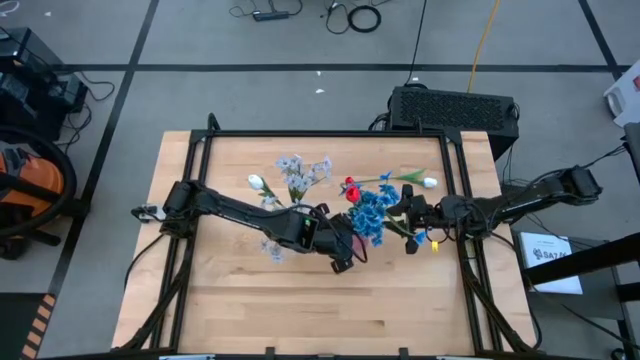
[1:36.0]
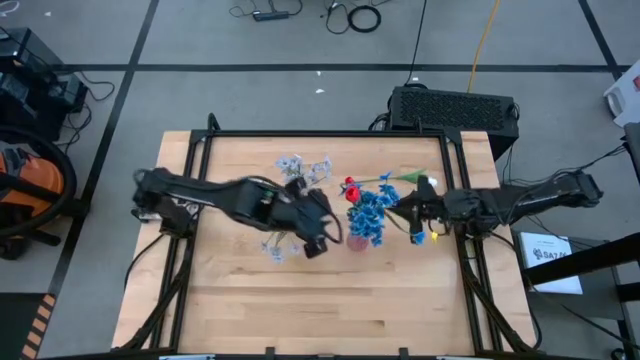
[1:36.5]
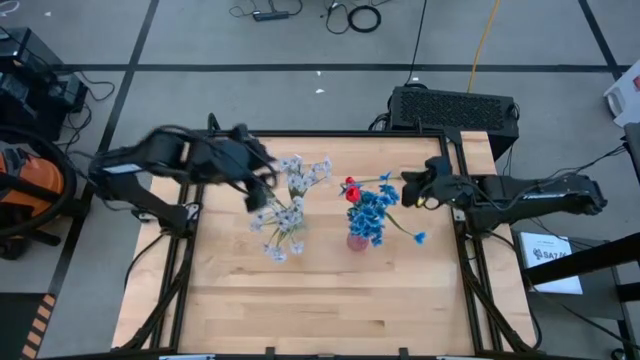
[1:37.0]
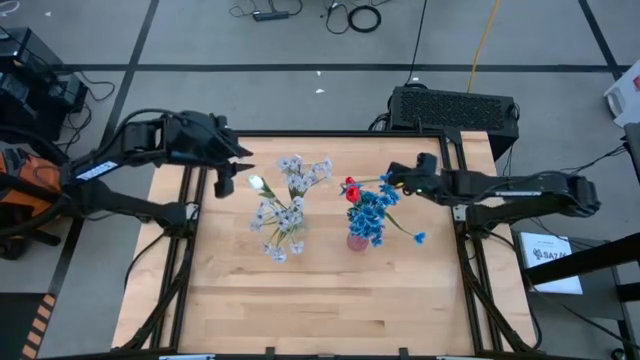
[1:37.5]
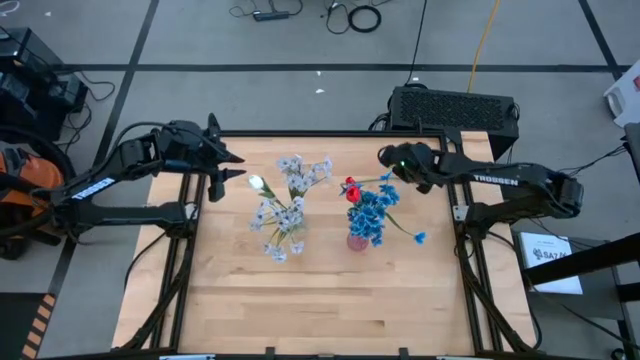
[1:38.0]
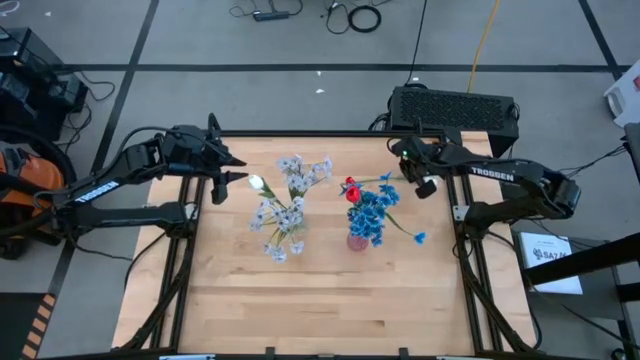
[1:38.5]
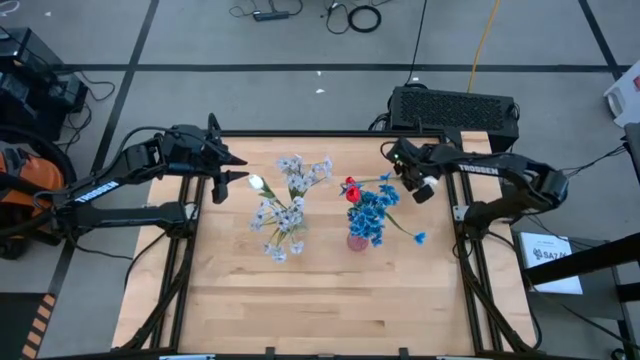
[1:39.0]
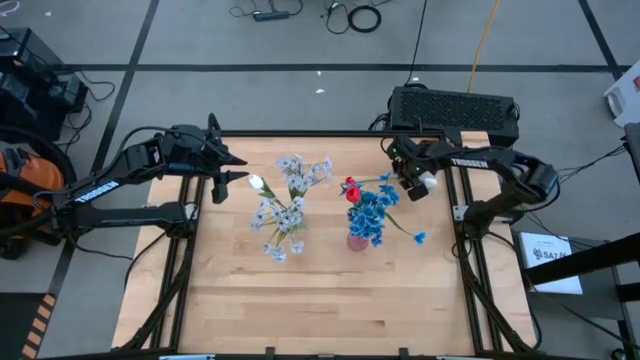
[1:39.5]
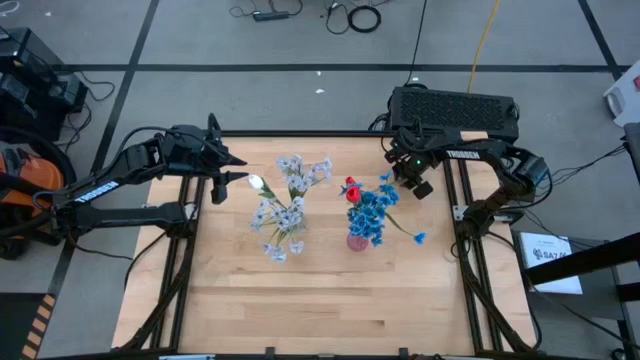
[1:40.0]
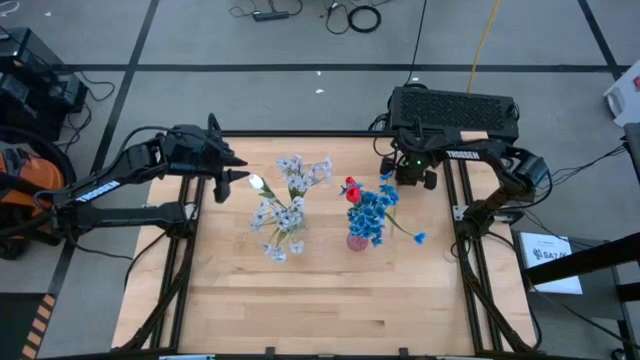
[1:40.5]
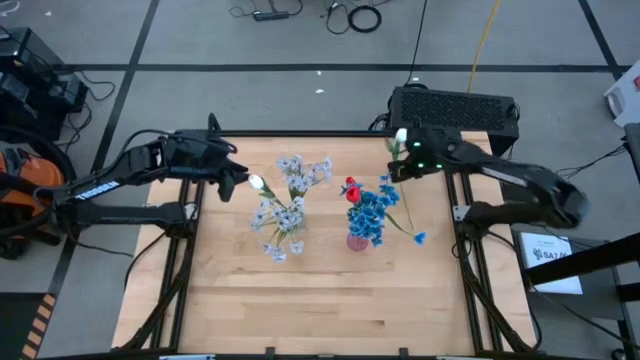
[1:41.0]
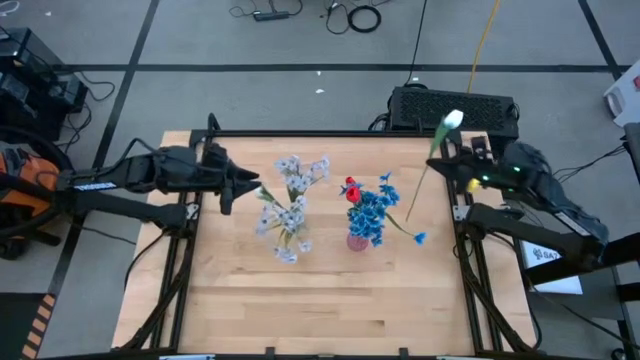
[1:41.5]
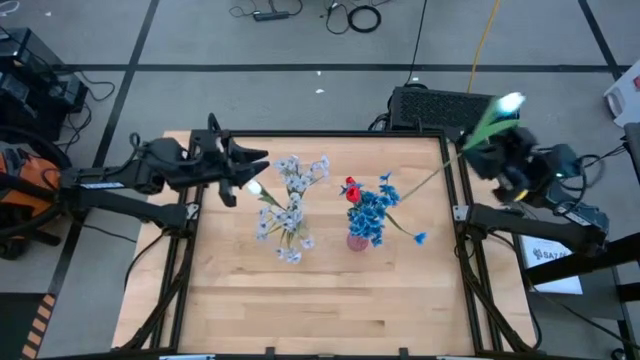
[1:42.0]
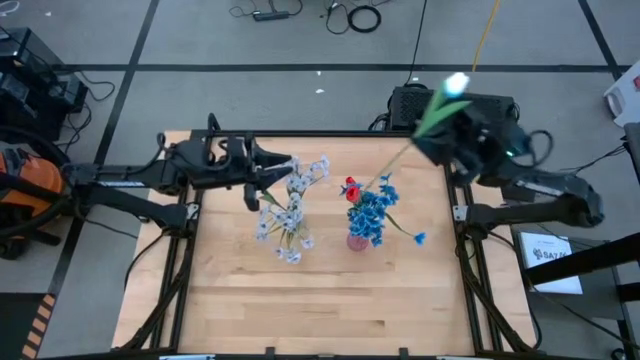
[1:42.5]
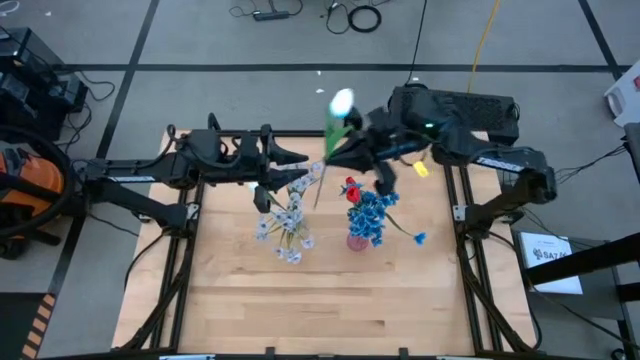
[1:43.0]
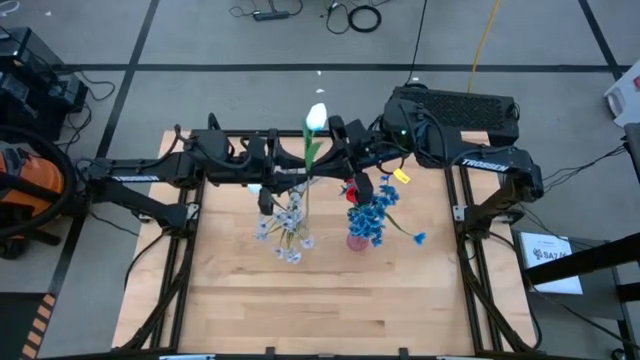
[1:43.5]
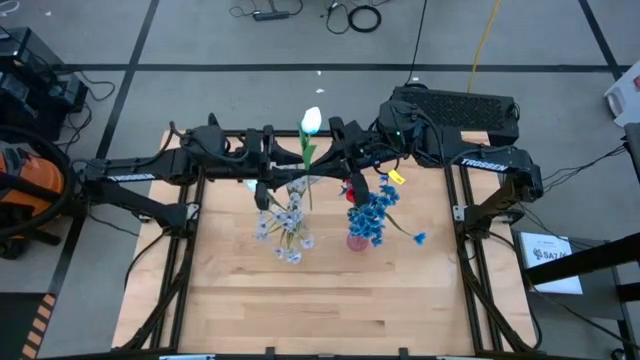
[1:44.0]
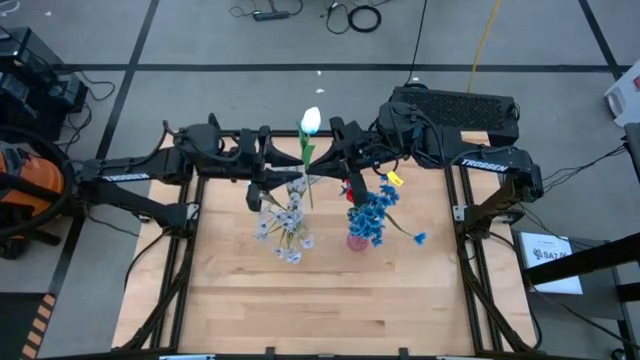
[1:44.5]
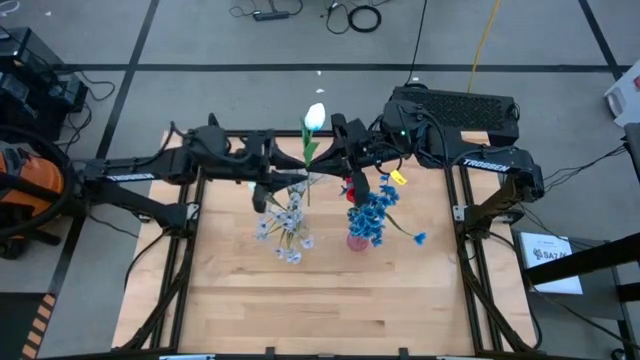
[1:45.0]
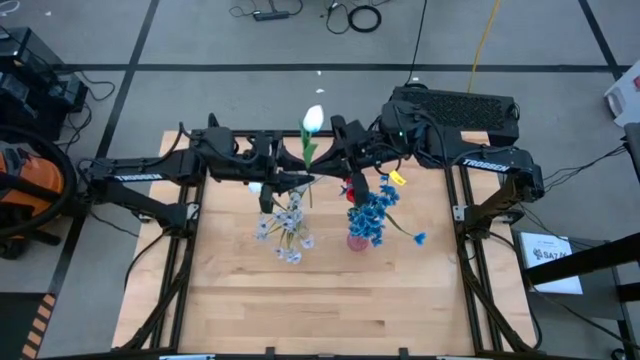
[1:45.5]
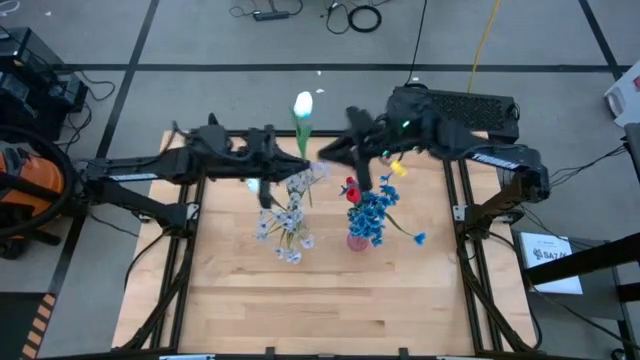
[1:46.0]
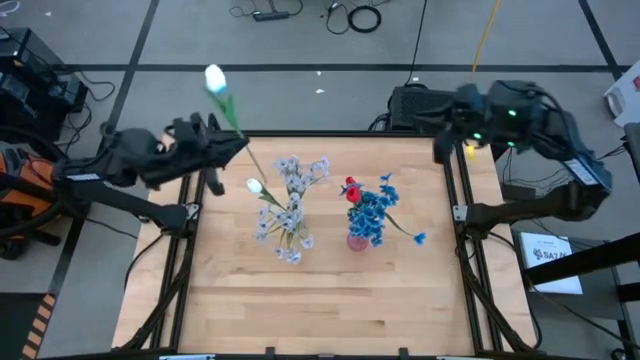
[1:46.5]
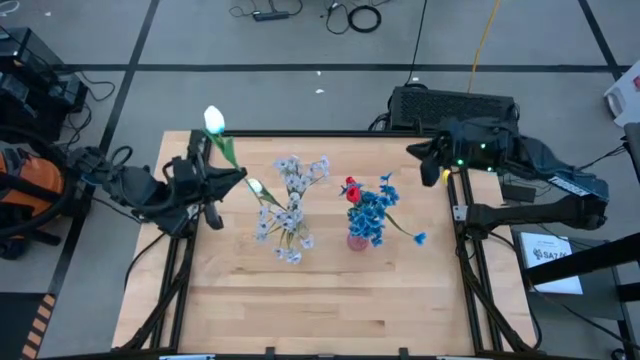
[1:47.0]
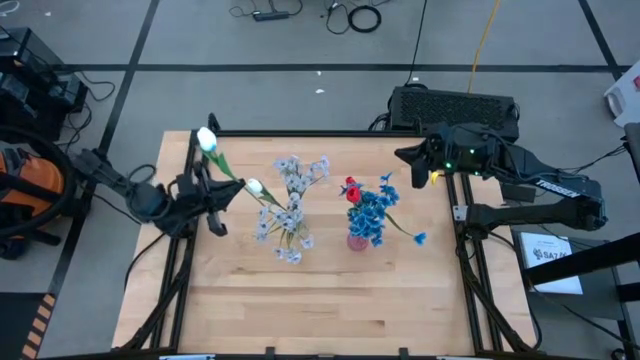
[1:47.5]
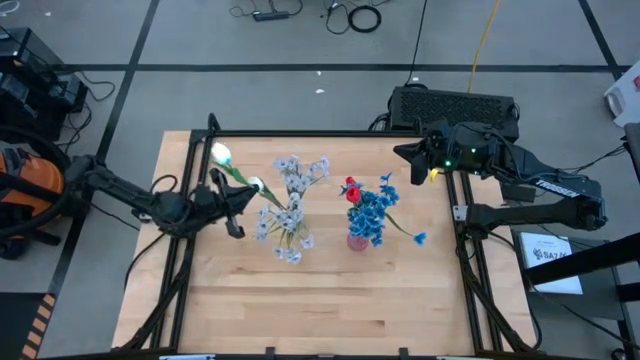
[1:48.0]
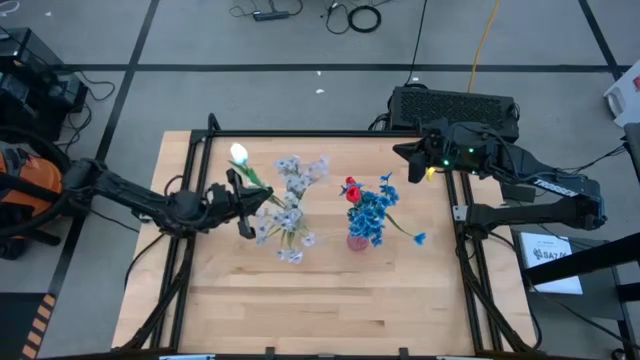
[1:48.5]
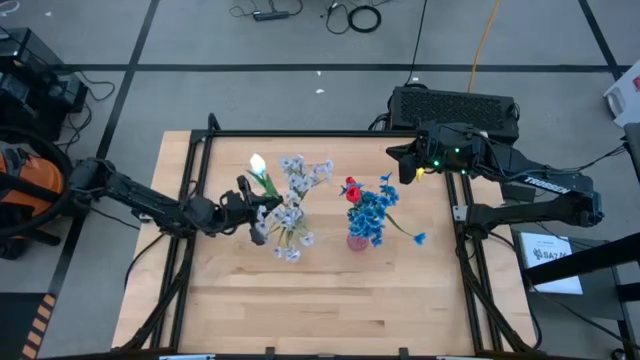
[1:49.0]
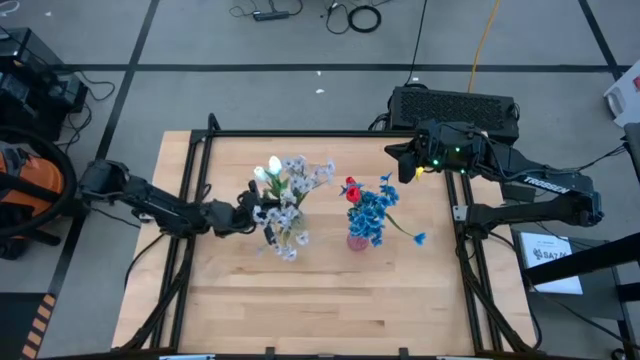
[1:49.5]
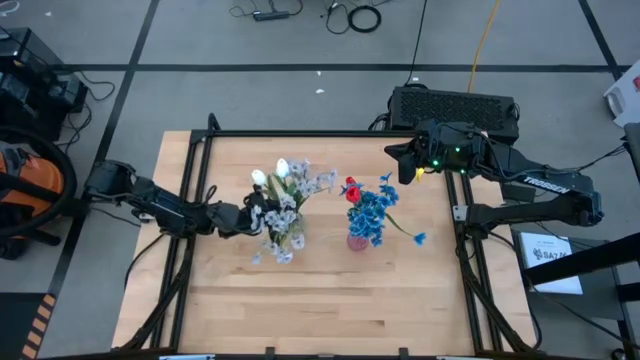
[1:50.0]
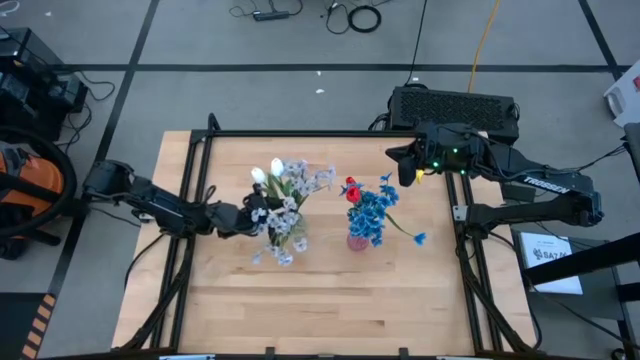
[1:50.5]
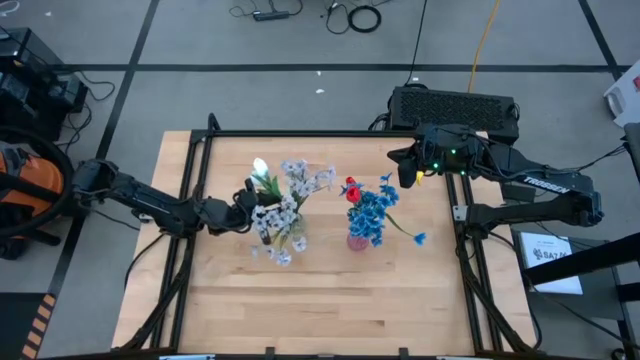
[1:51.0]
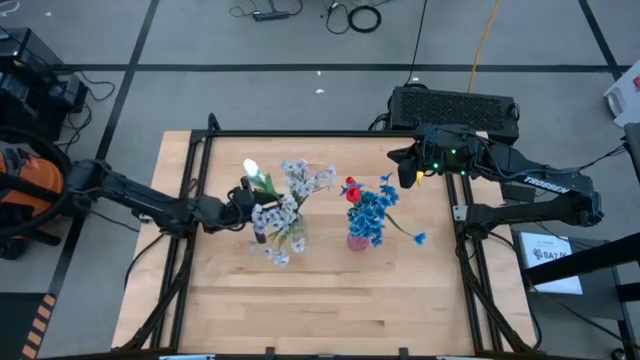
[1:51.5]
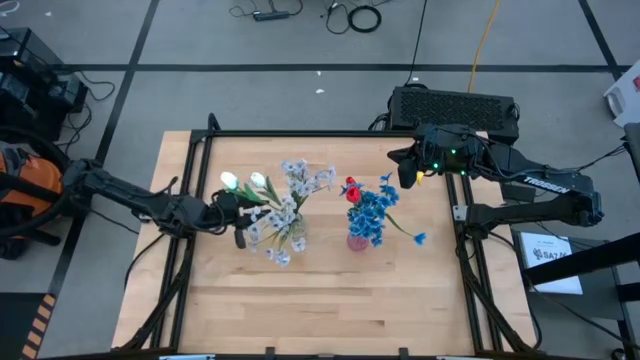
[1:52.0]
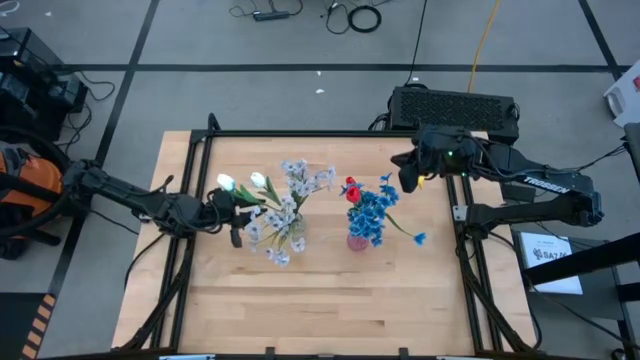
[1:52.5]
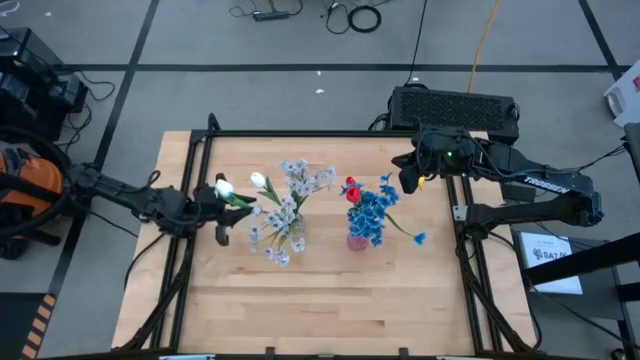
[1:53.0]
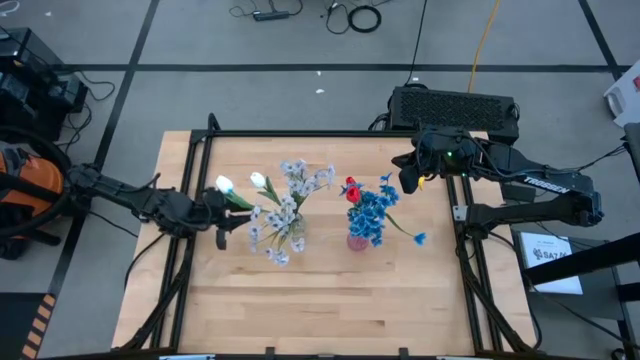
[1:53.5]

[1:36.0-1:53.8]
Task: Sort flowers into vase by color
Put the white flower into the transparent vase

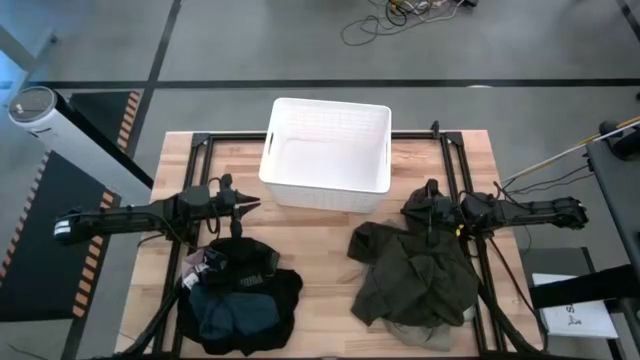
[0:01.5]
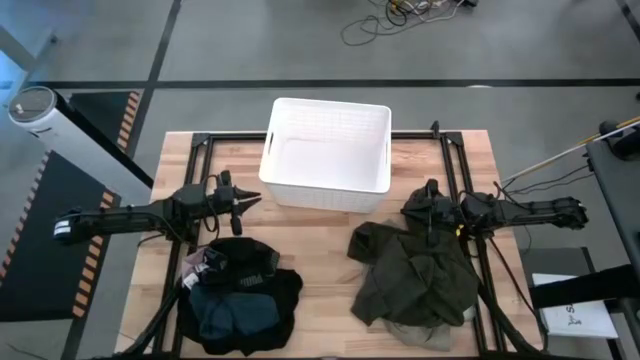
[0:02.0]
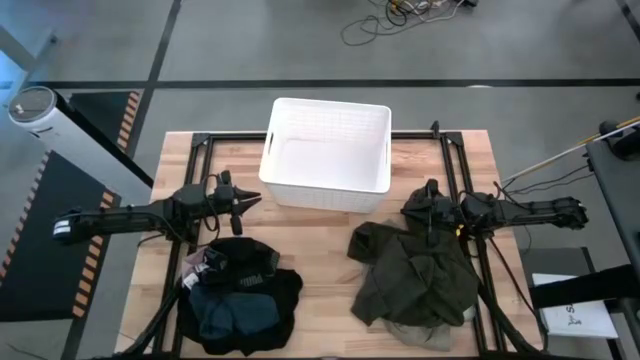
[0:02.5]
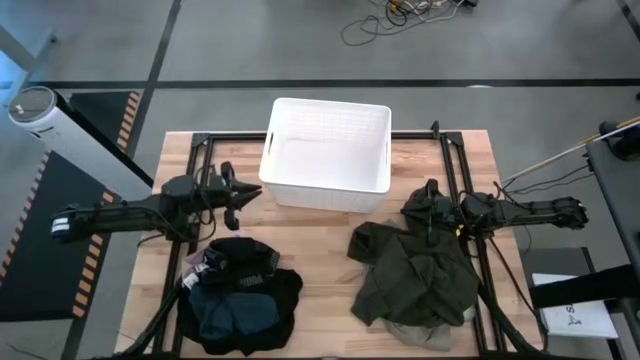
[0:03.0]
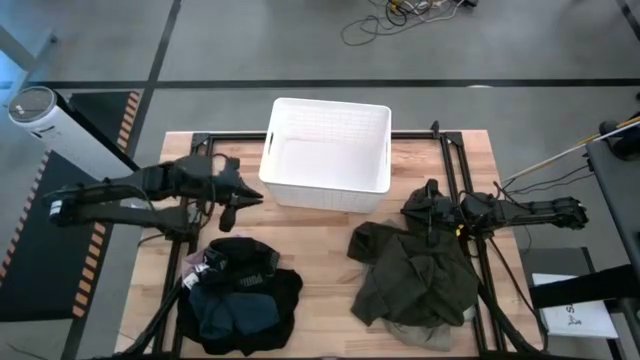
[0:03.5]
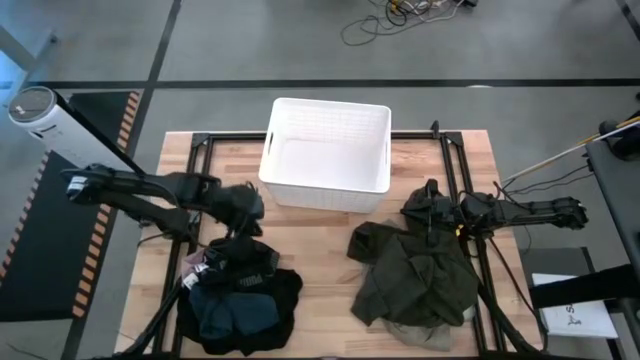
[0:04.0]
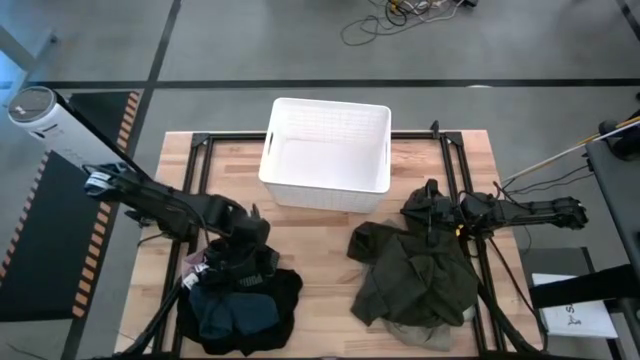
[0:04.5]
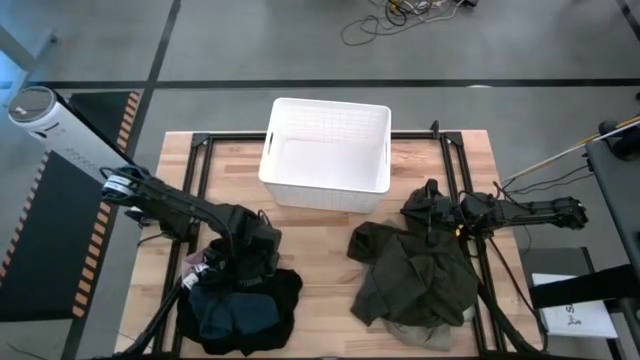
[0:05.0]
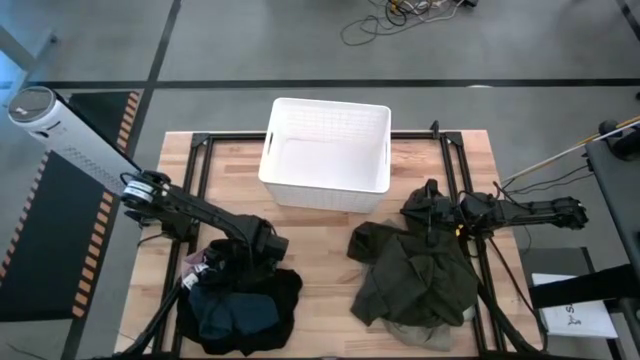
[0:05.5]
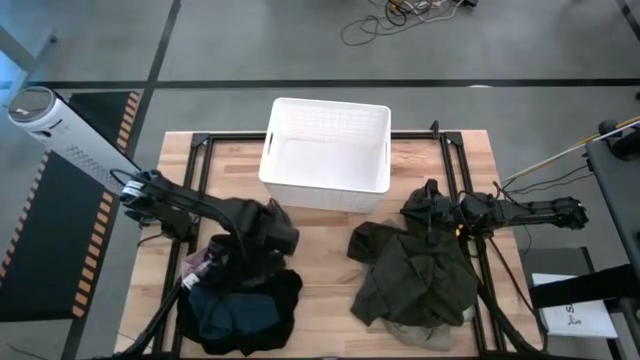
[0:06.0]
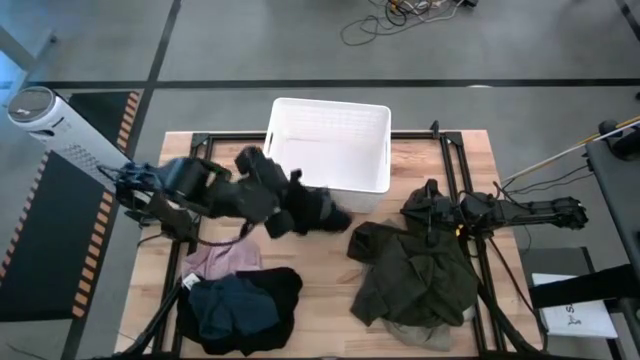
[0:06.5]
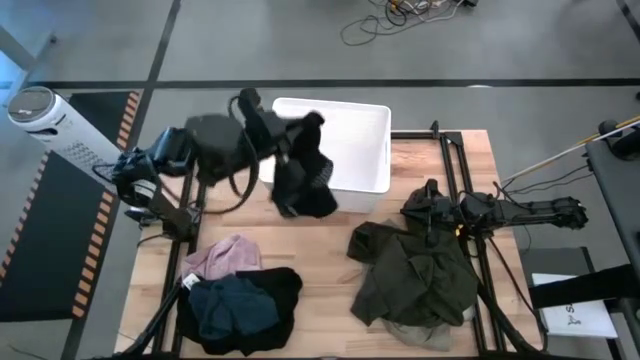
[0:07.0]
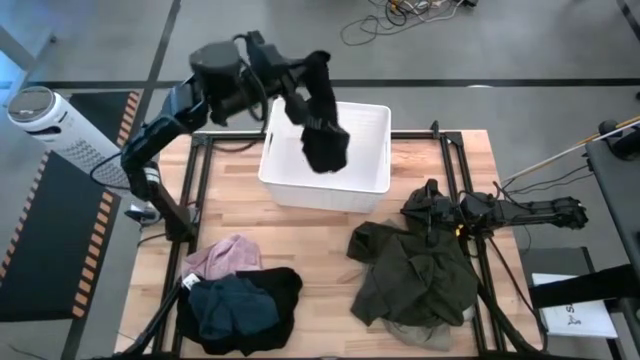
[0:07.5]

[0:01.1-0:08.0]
Task: Sort clothes
Put the black underwear into the laundry bin
